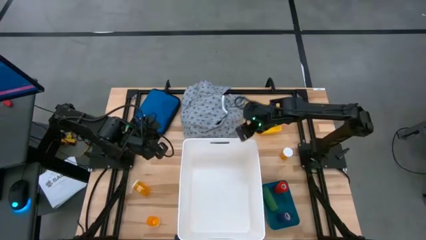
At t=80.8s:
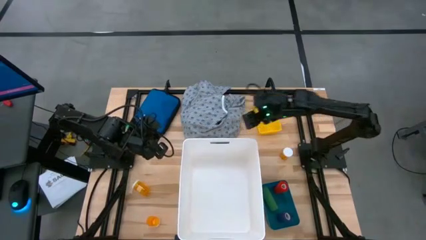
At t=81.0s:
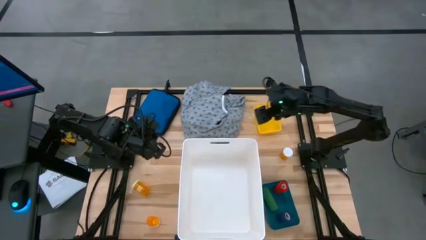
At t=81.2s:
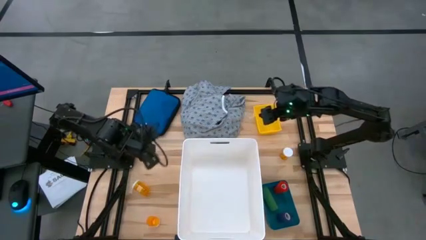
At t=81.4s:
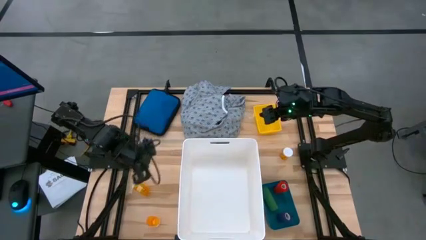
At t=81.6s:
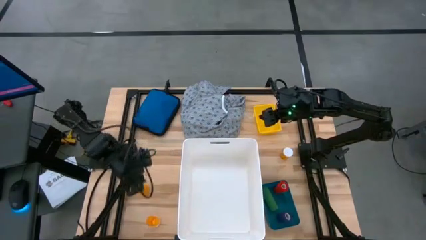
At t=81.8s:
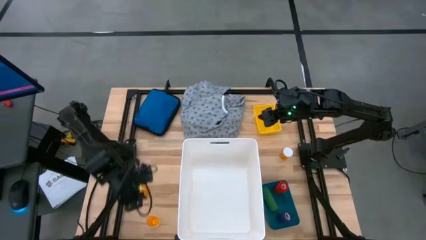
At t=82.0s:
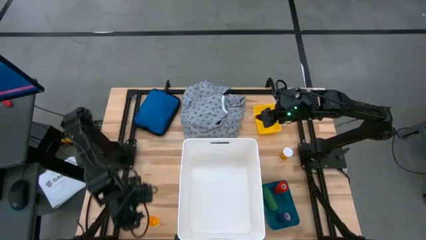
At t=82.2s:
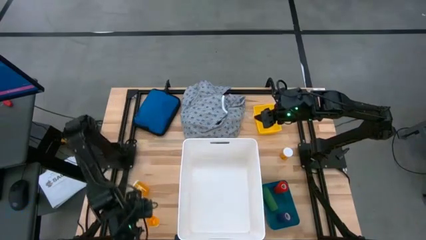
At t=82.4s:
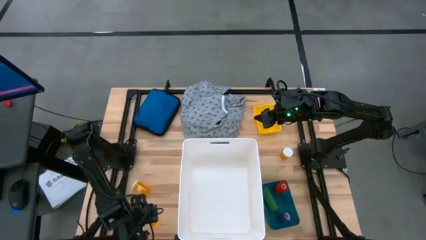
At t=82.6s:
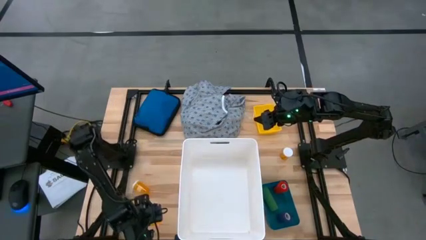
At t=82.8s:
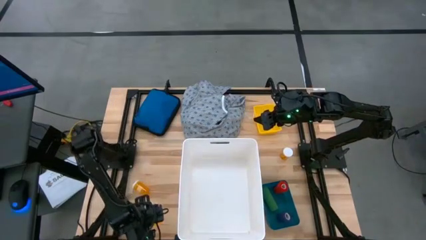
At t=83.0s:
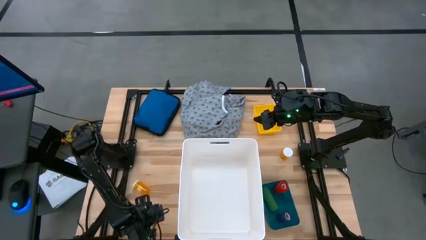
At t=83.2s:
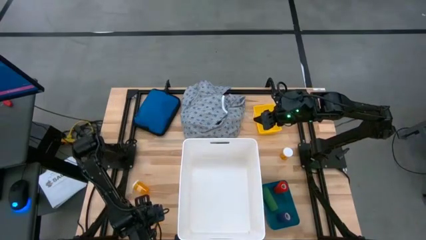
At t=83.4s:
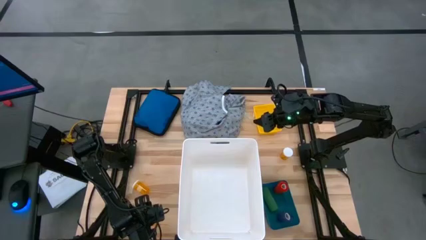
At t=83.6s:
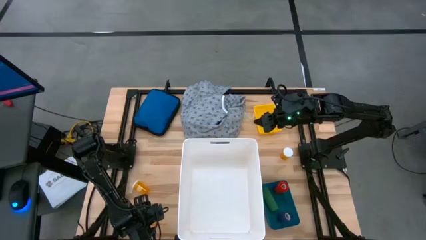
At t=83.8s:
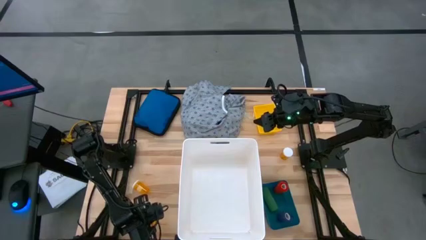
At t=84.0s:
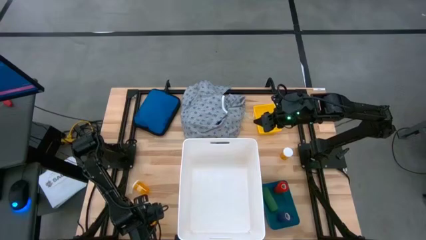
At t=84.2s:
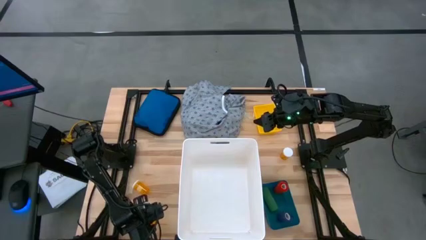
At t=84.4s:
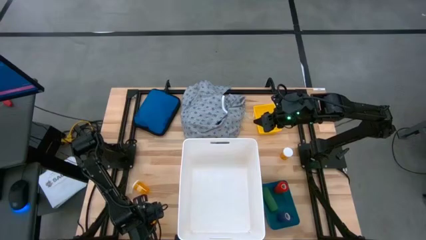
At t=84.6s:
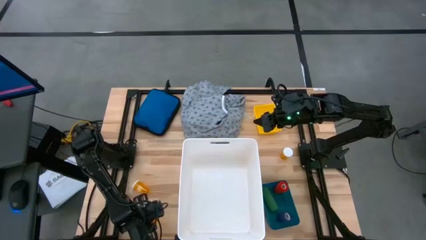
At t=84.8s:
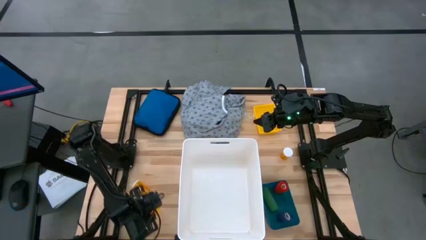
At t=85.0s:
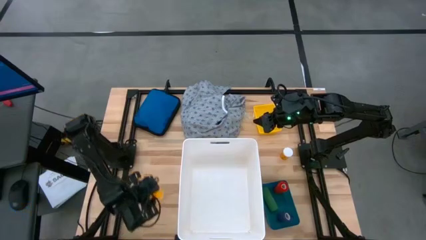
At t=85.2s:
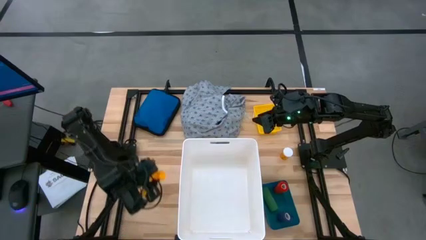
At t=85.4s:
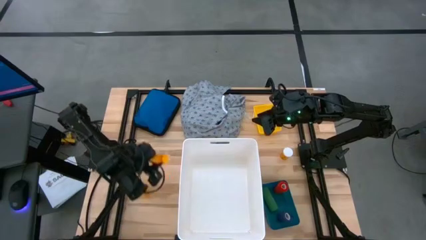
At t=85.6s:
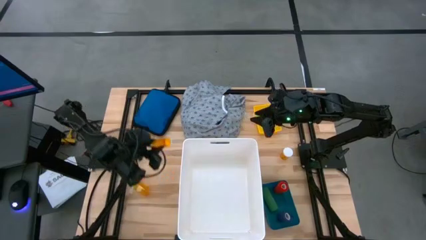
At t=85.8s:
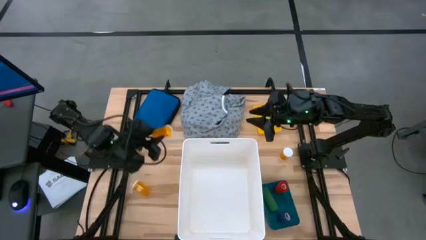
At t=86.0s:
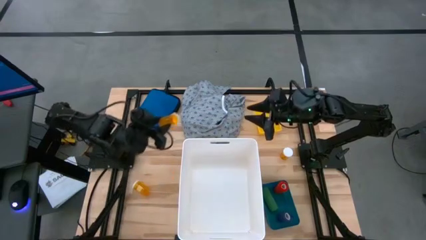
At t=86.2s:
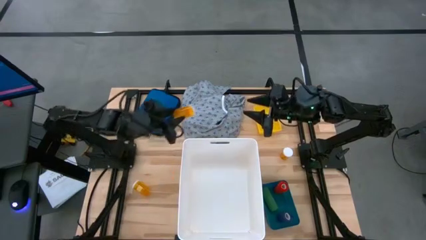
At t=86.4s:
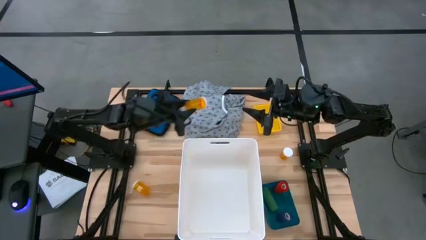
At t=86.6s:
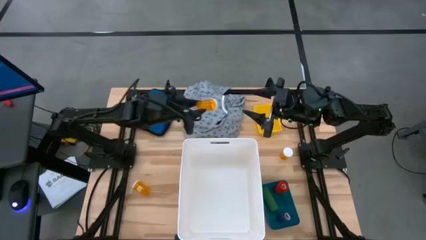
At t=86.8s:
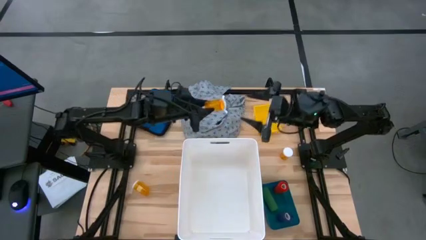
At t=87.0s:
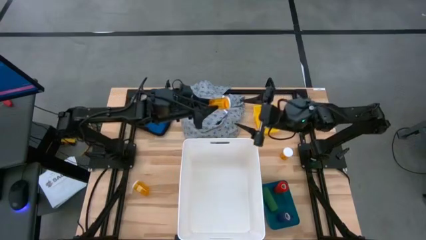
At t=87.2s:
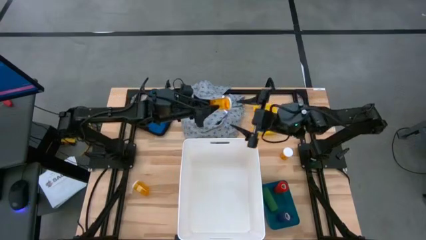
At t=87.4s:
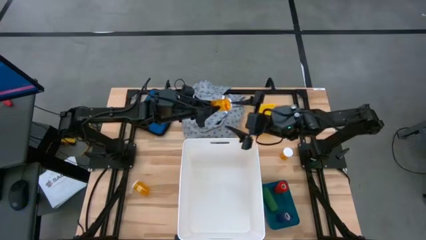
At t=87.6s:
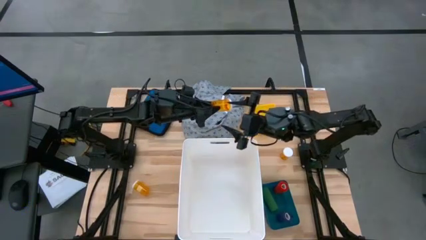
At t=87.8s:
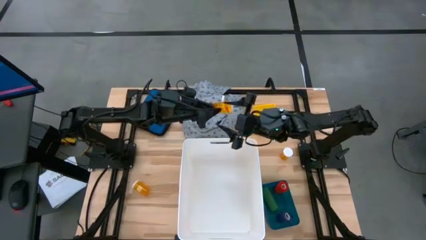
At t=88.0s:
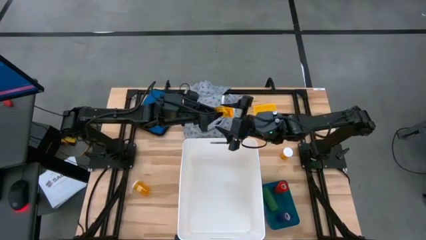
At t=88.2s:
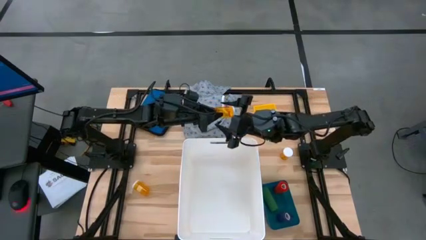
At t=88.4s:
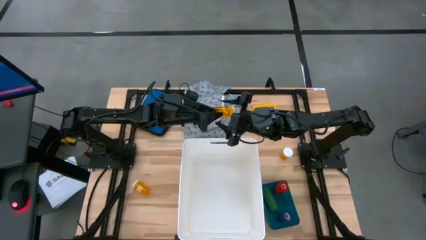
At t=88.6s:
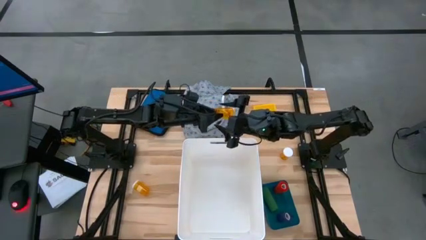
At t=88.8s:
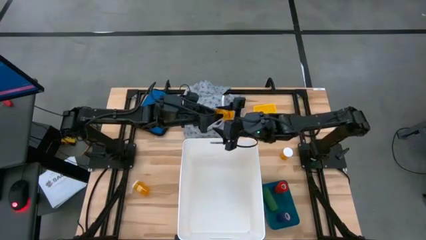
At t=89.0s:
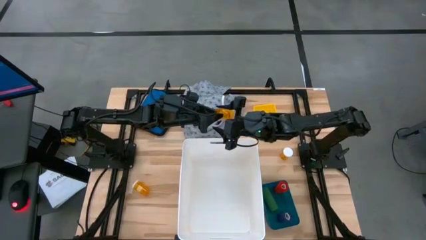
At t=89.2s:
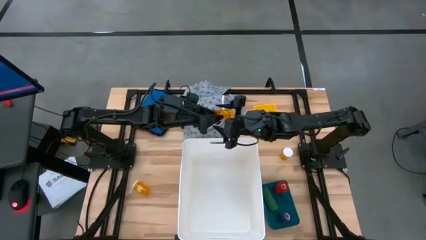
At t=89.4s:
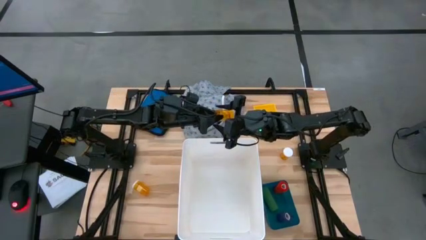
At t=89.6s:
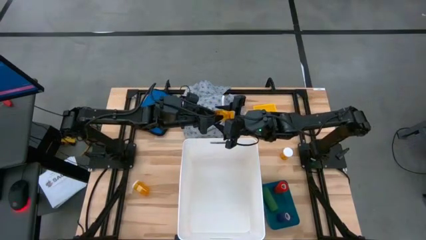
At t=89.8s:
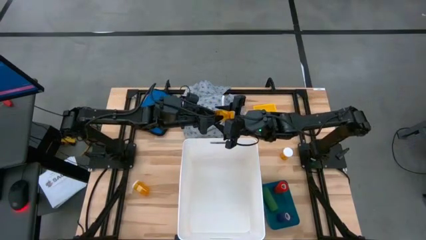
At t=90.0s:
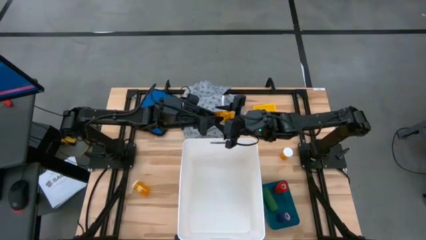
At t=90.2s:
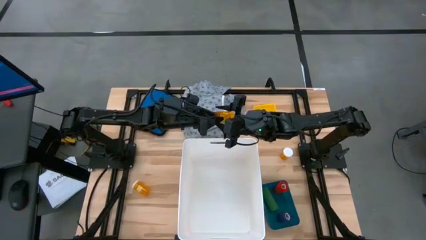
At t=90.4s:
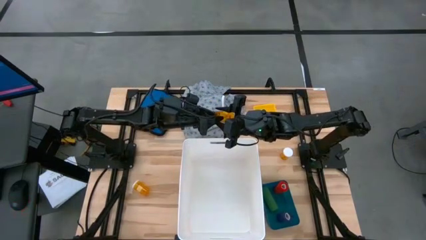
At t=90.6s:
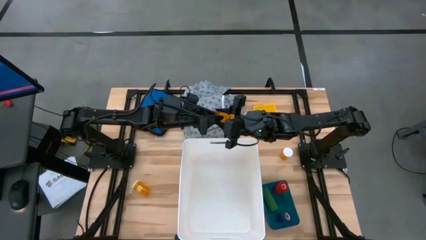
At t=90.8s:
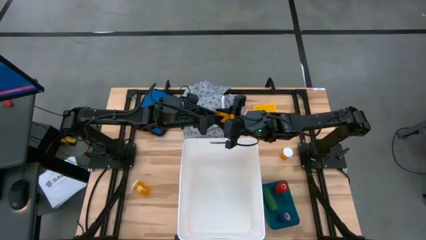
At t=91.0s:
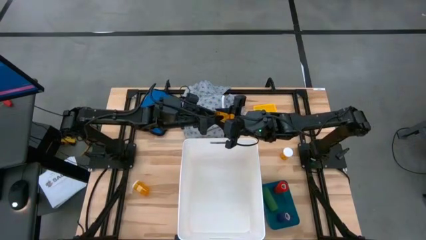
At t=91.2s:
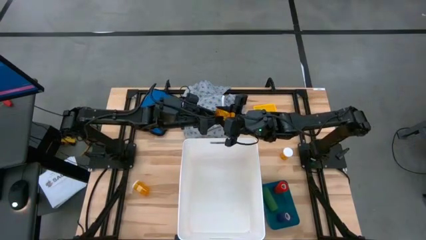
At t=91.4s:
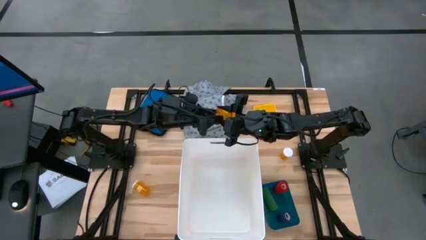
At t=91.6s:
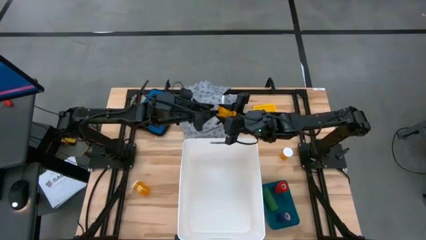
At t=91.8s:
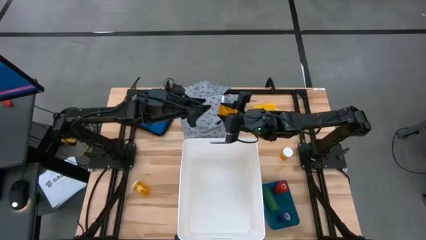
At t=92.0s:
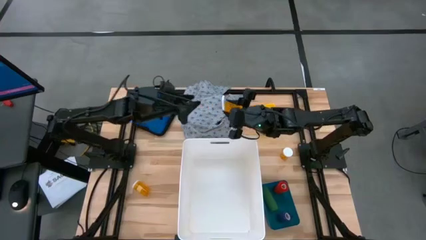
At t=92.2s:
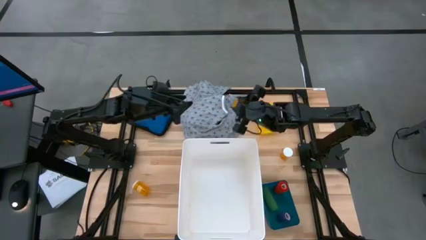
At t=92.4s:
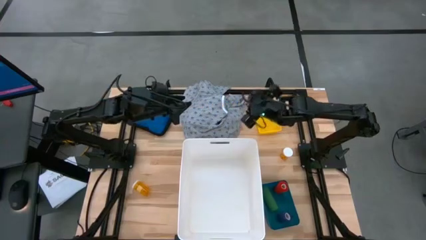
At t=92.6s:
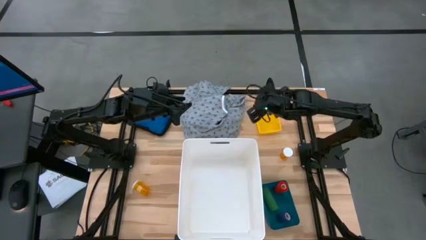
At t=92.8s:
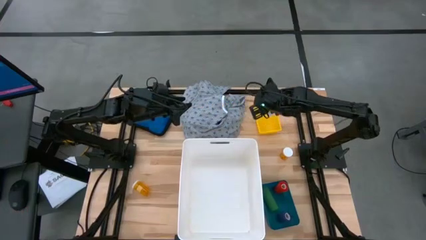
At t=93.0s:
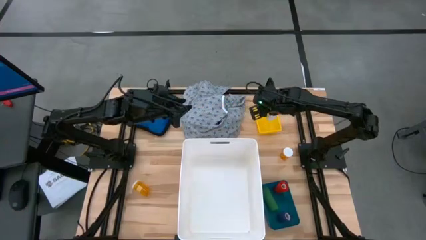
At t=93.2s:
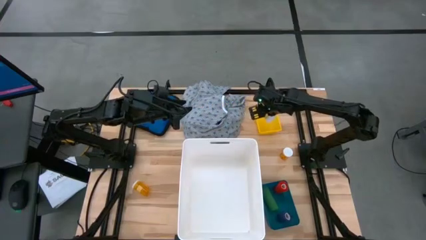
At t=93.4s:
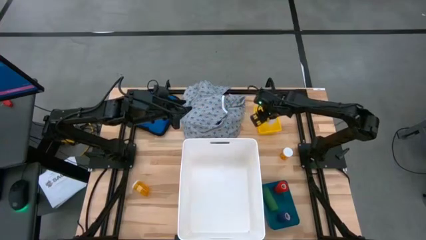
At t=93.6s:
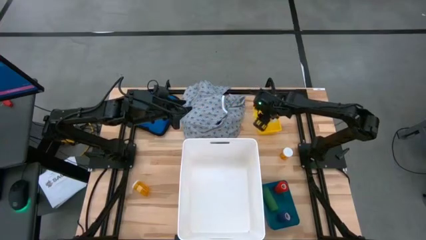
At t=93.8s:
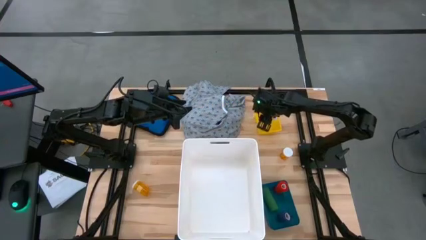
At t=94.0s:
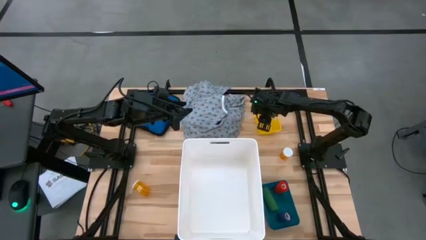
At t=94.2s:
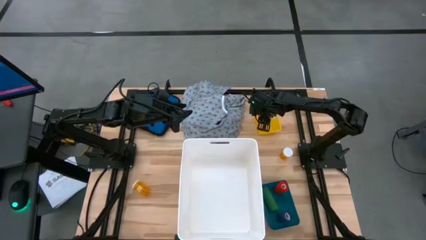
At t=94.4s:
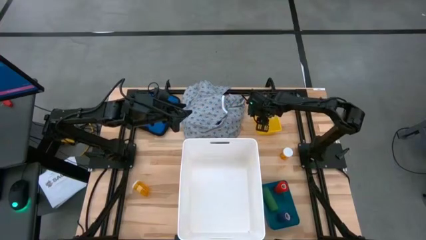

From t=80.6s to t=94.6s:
Task: Pick & place medical supplies in basket/bin
Put the bottom left orange pill bottle into the yellow bin
